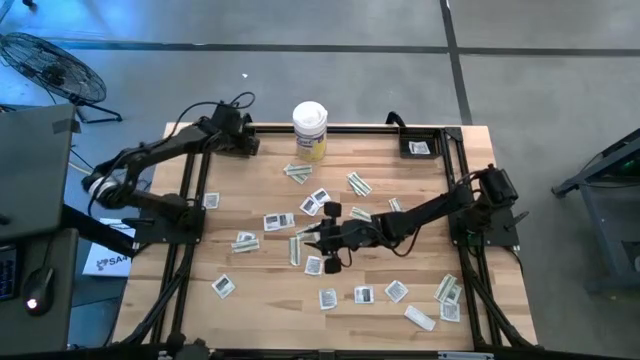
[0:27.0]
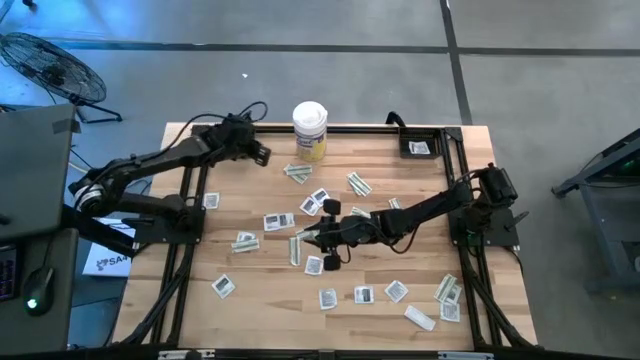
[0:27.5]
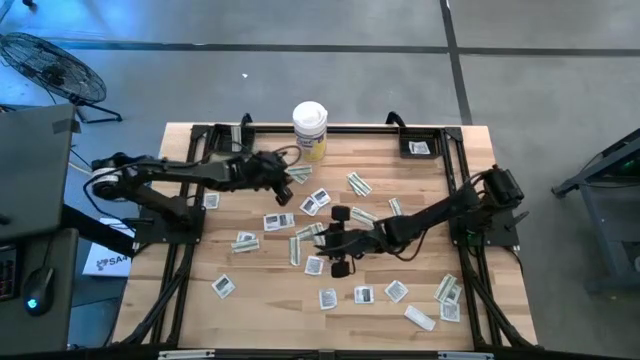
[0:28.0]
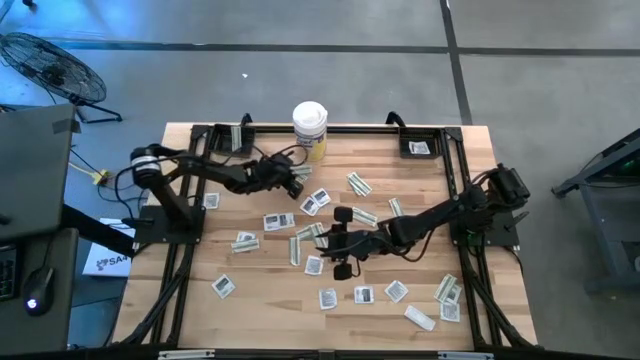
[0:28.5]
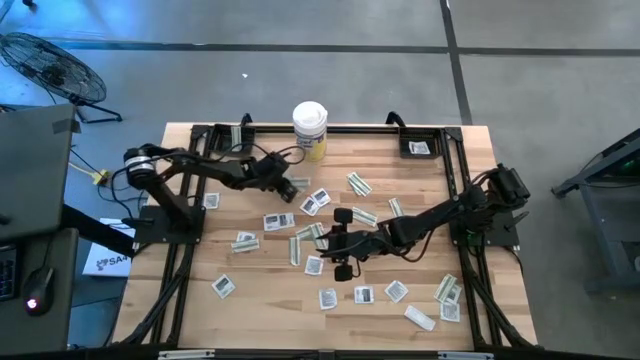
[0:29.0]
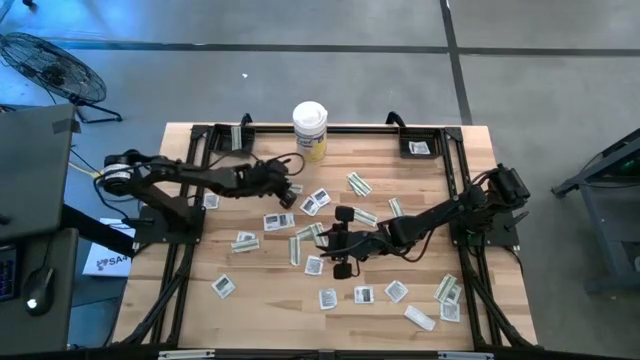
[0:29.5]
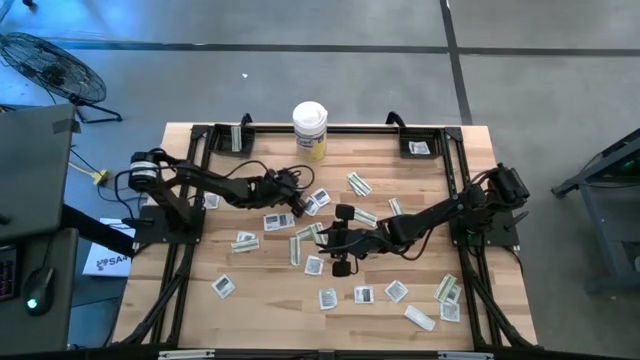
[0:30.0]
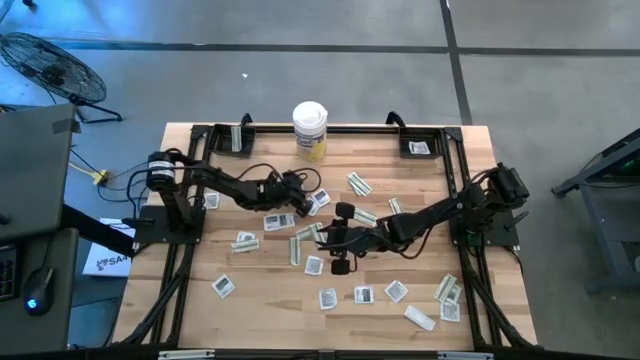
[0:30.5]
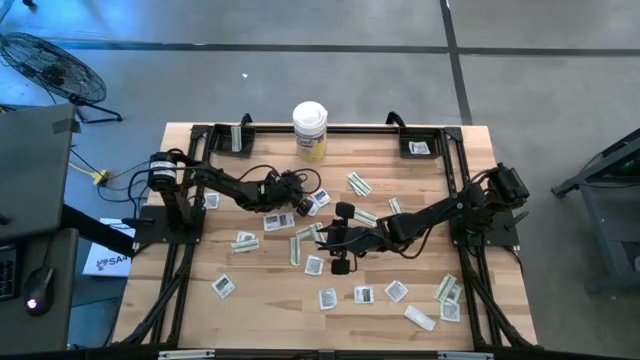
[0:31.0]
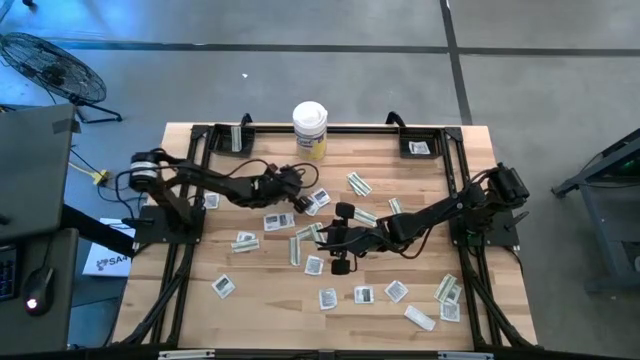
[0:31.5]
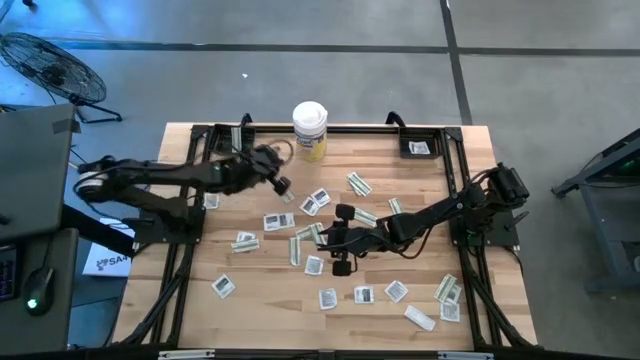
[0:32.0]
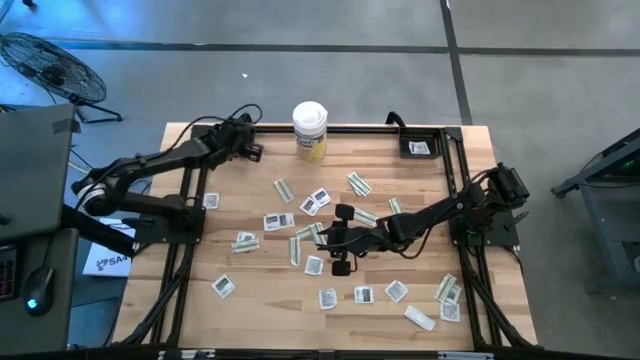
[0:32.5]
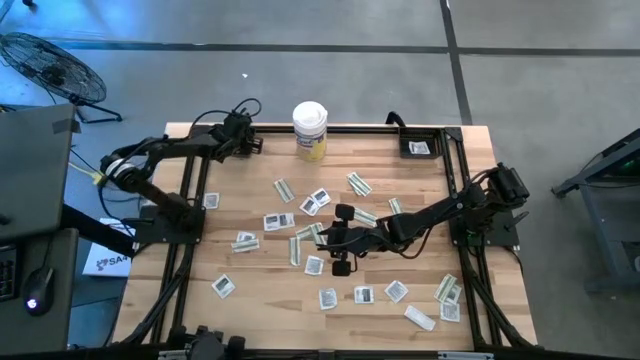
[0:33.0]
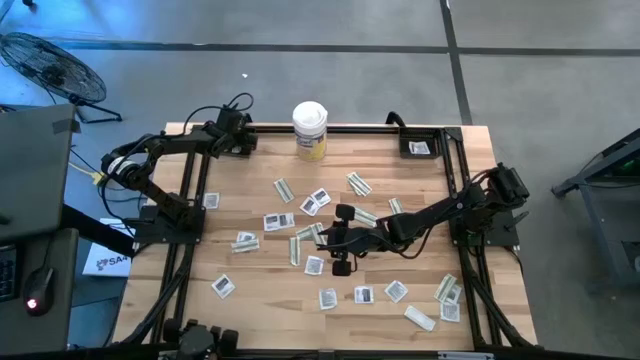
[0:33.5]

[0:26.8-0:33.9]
Task: Pick & Place First Aid Supplies
Put the green bandage pack into the left black basket

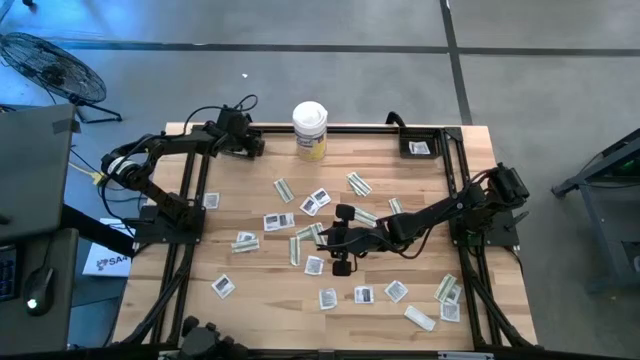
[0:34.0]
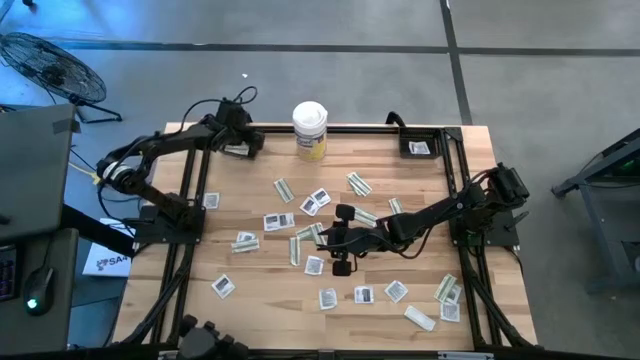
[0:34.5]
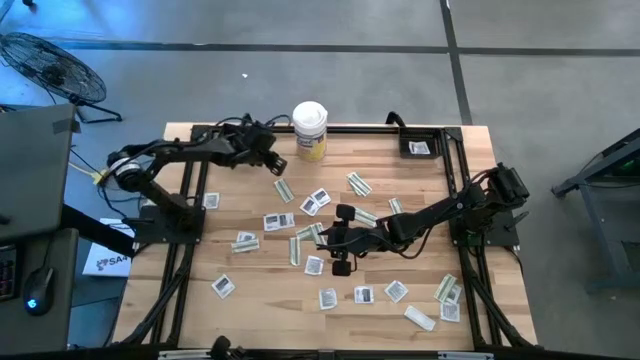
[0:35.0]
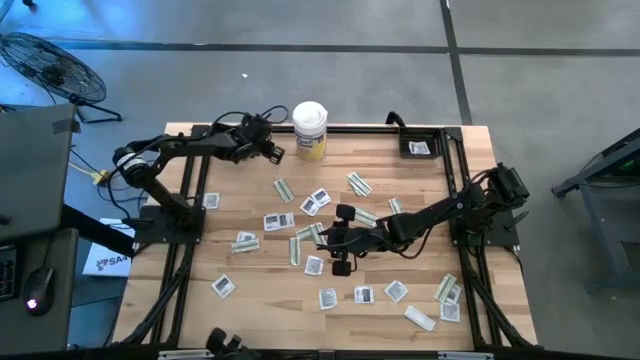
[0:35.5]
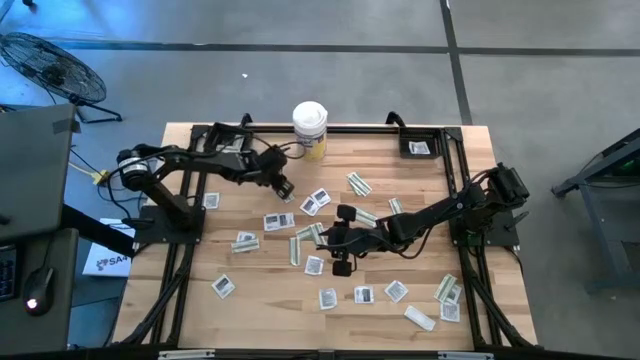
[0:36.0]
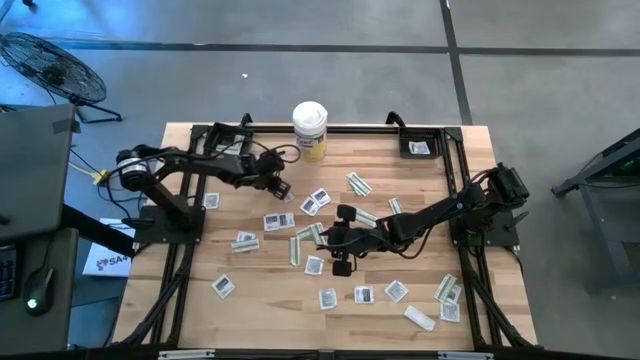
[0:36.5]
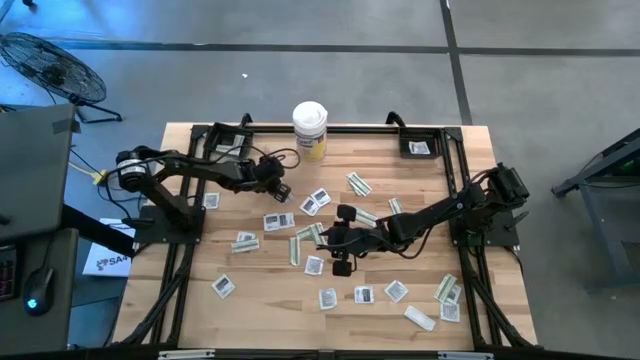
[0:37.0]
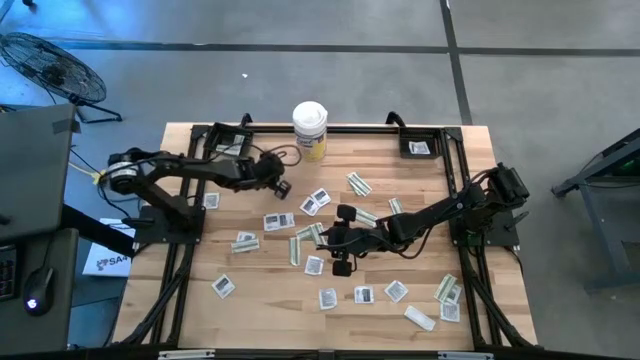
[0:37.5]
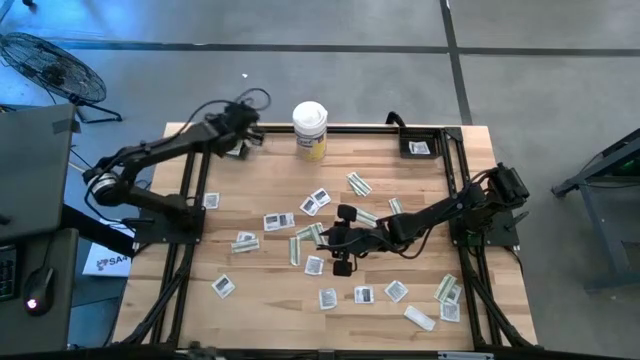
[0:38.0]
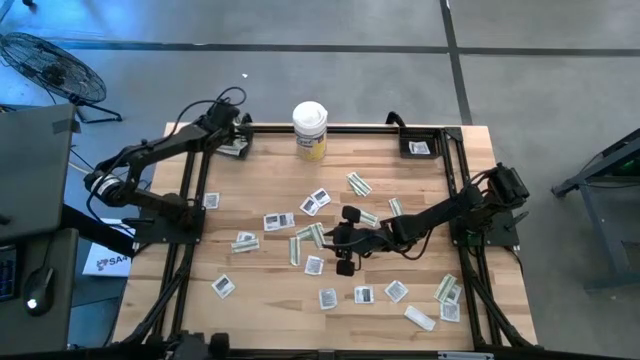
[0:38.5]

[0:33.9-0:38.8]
Put the green bandage pack into the left black basket

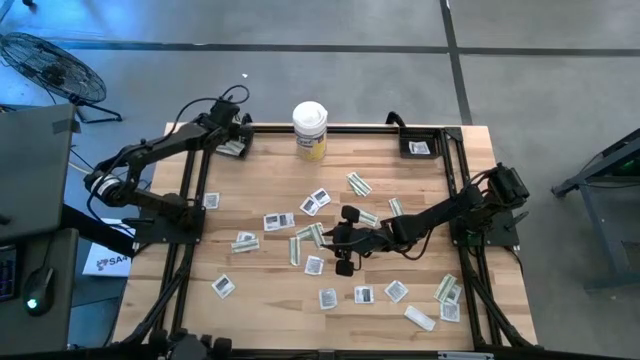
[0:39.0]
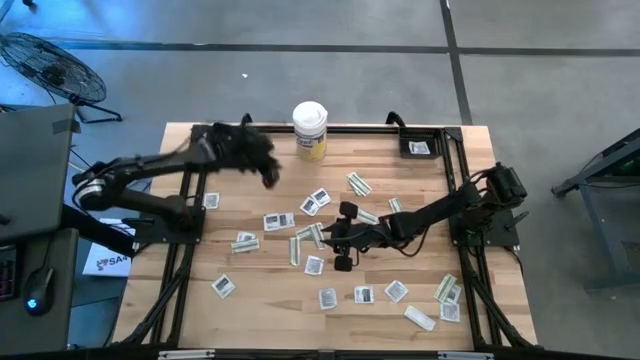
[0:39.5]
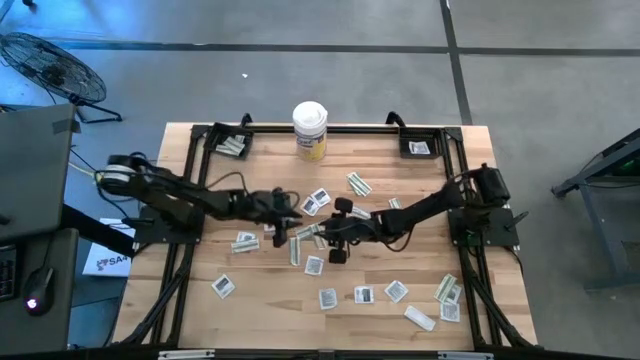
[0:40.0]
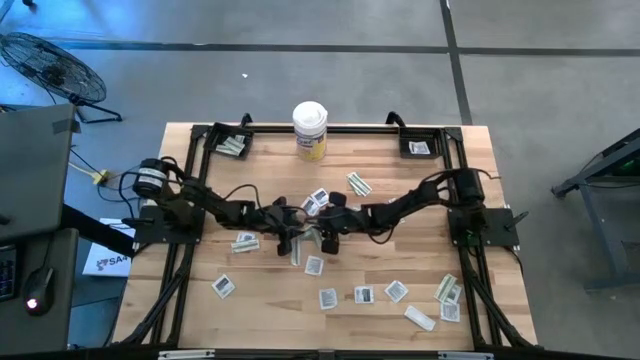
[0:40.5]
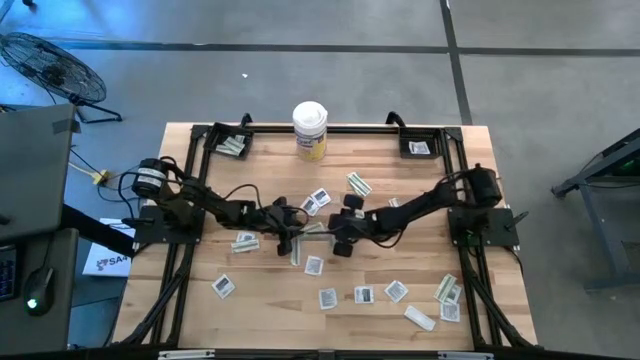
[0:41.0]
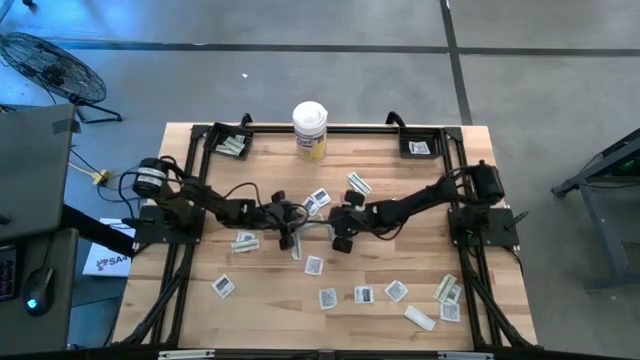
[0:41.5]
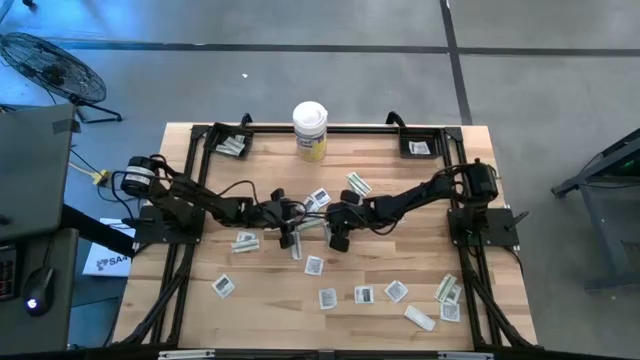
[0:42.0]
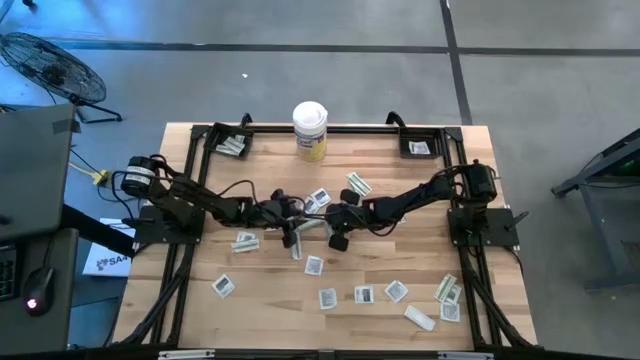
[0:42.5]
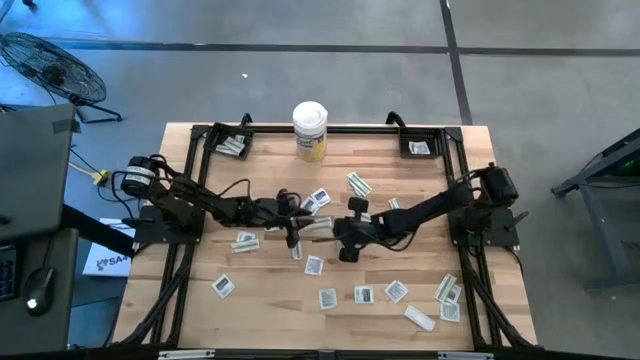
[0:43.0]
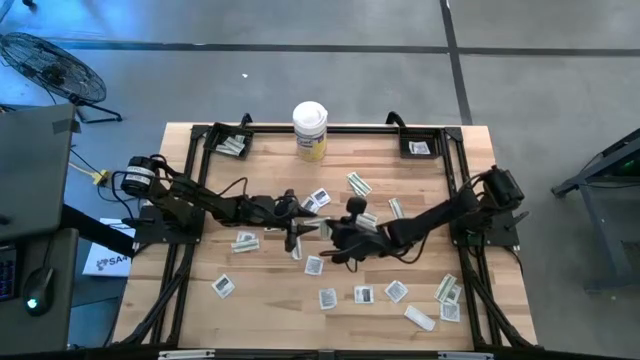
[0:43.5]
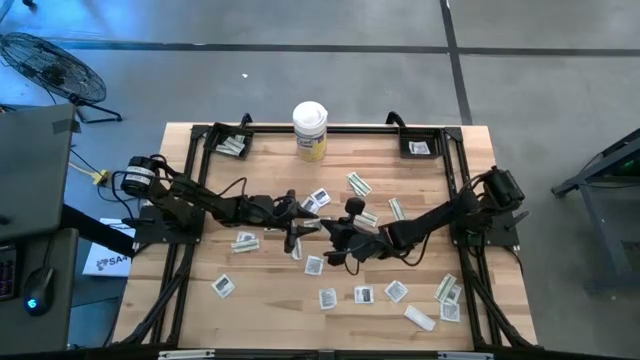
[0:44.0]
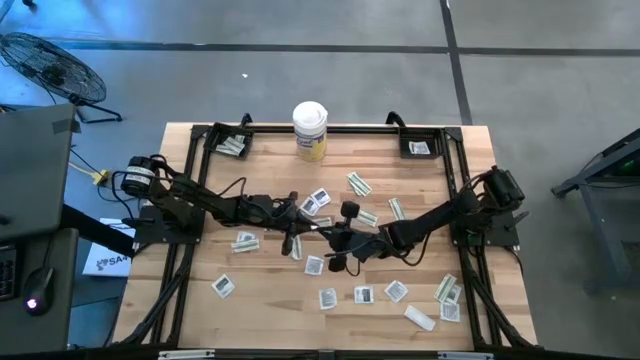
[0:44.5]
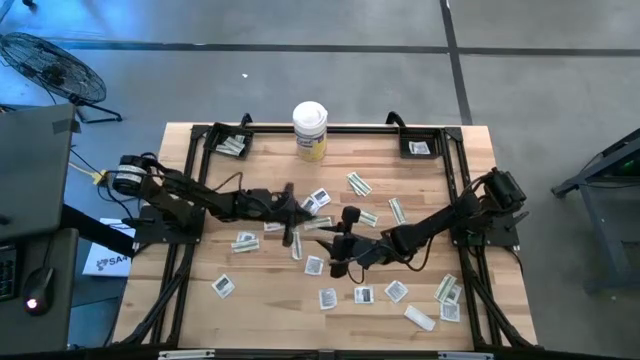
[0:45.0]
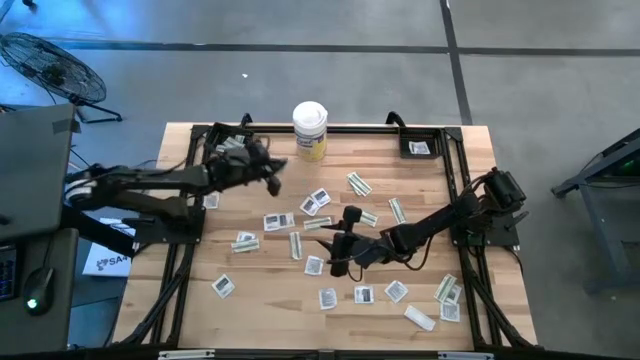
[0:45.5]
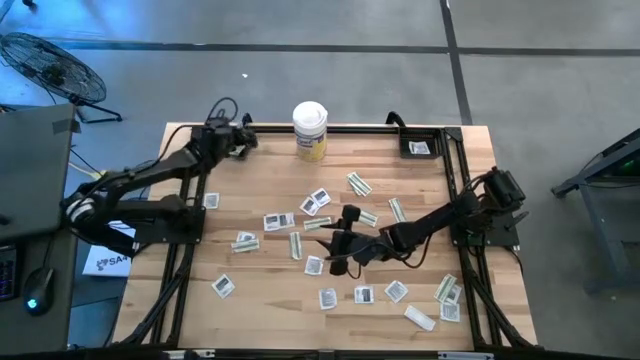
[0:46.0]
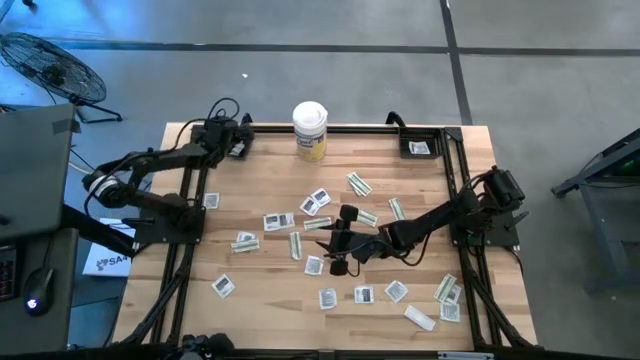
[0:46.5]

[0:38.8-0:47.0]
Put the green bandage pack into the left black basket

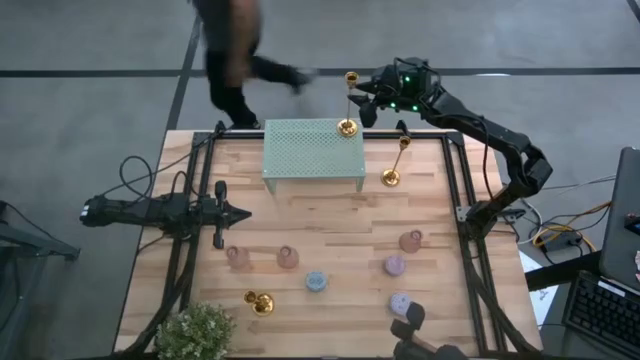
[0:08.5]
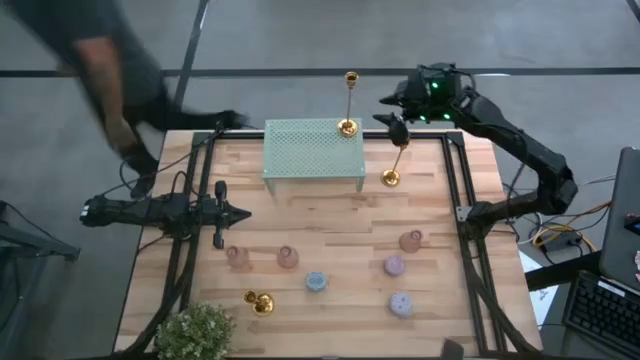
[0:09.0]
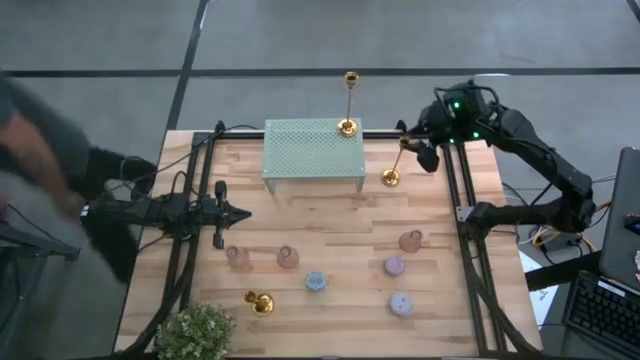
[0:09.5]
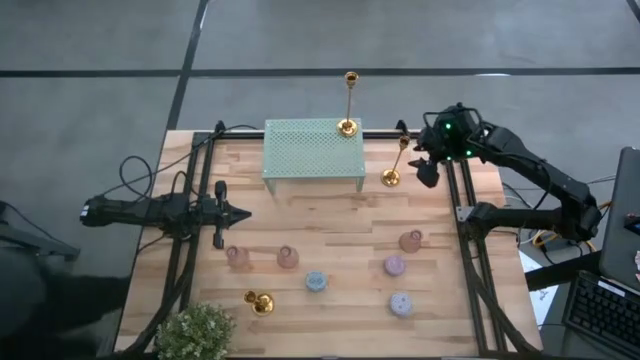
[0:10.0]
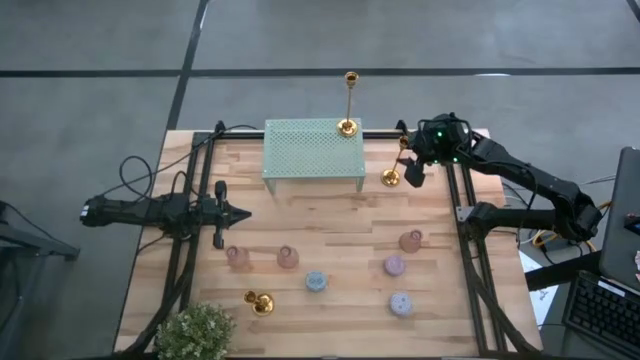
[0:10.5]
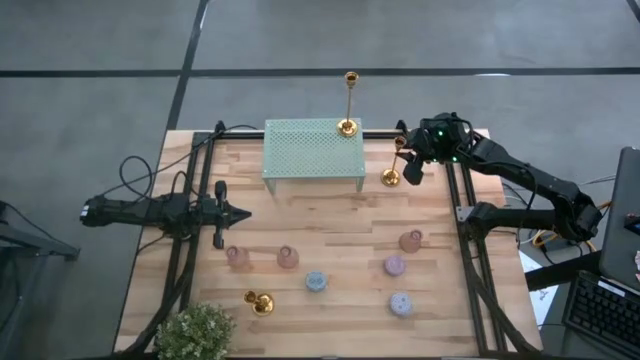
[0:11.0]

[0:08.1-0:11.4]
Task: Pick & Place candle stick holders
Put the top gold candle holder on the shelf aligned with the other gold candle holder
